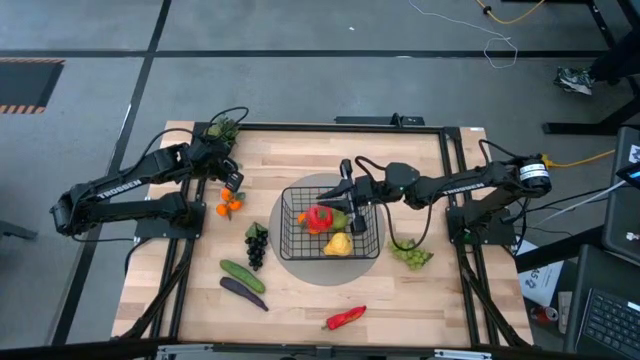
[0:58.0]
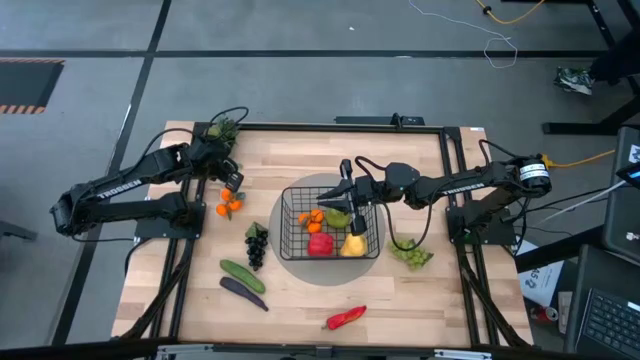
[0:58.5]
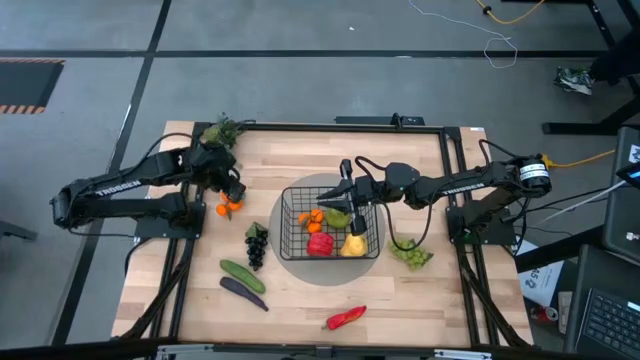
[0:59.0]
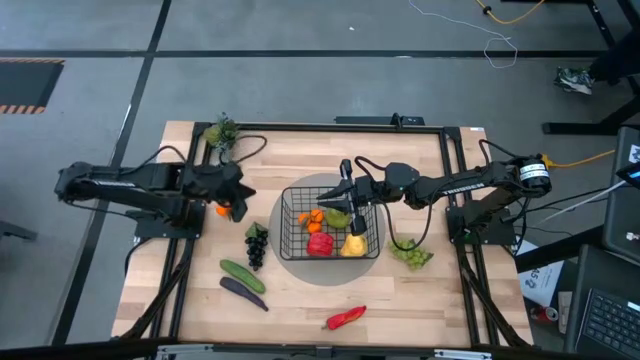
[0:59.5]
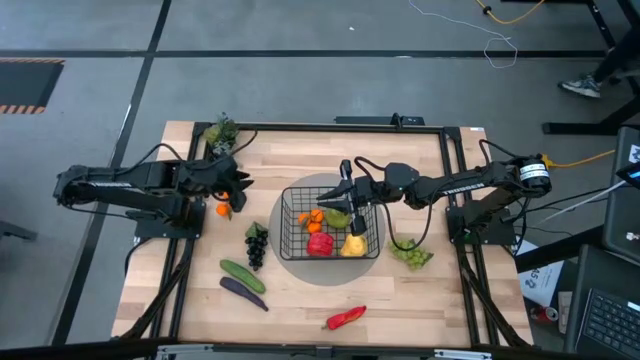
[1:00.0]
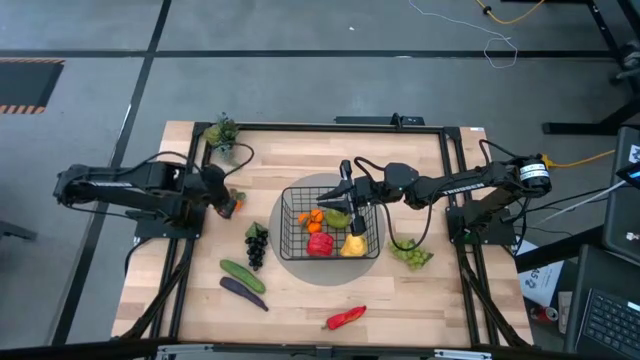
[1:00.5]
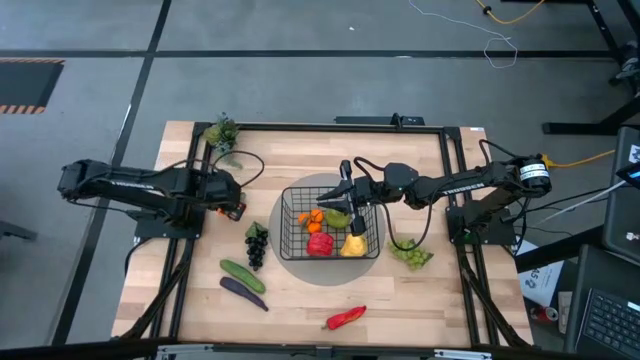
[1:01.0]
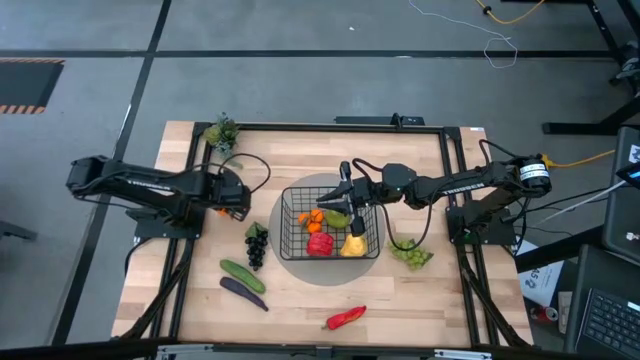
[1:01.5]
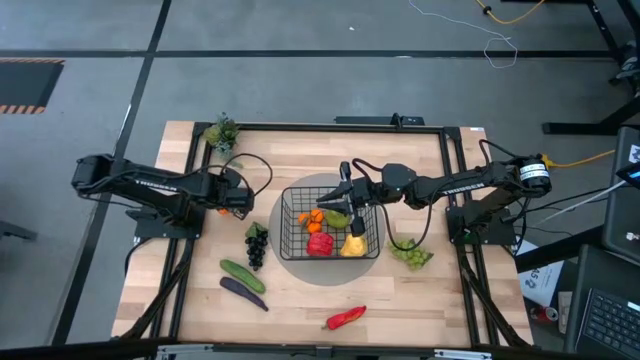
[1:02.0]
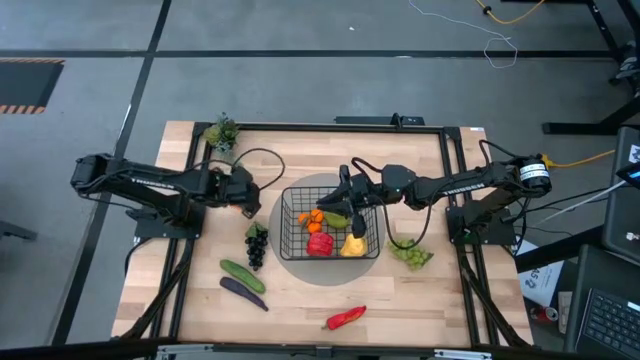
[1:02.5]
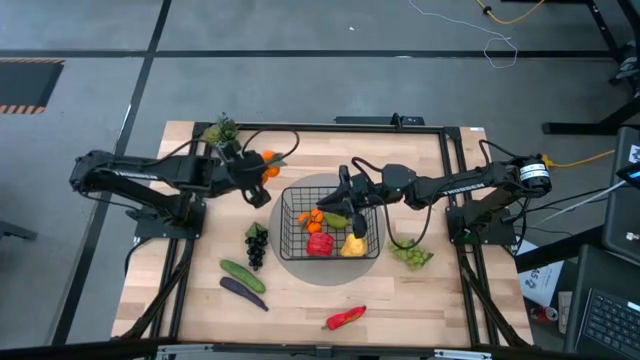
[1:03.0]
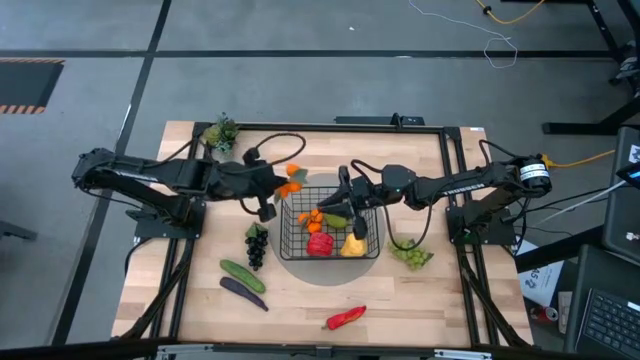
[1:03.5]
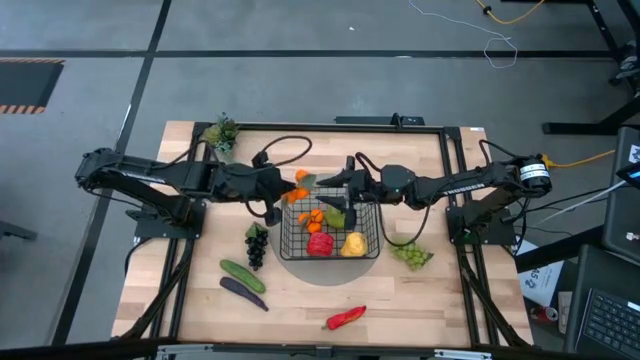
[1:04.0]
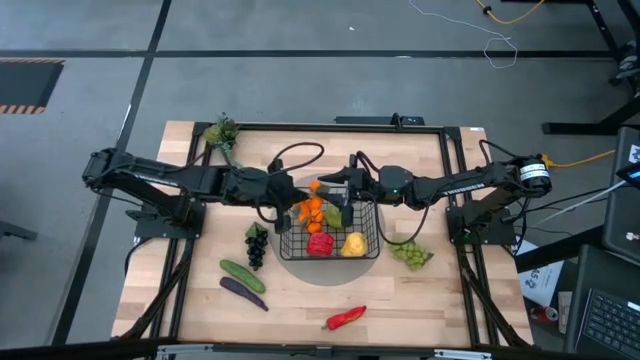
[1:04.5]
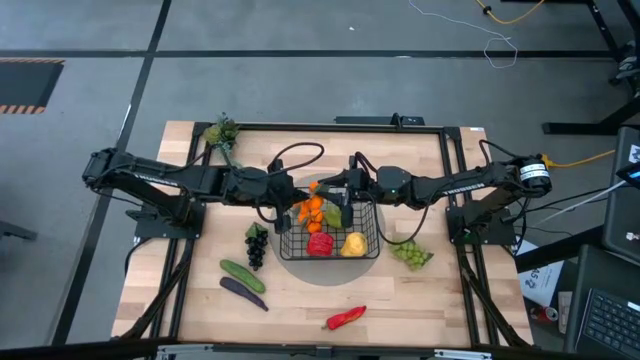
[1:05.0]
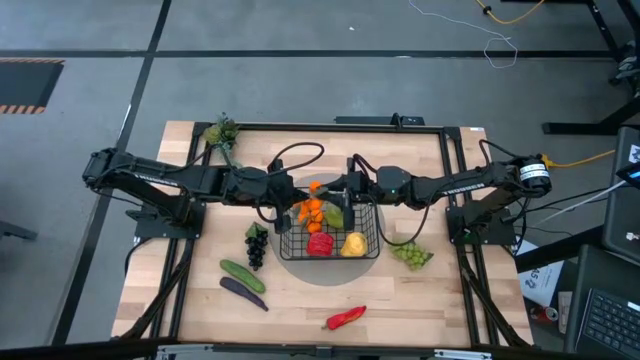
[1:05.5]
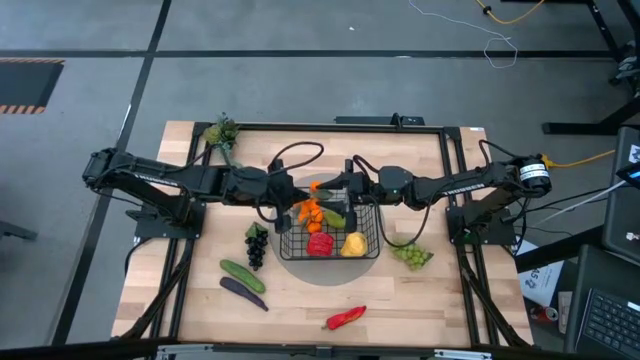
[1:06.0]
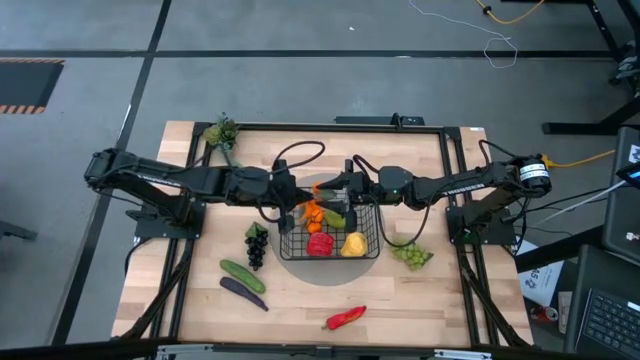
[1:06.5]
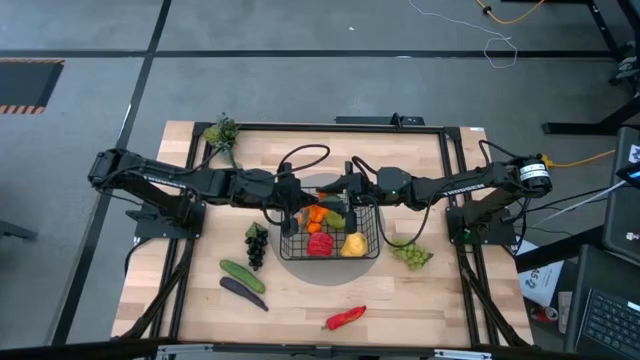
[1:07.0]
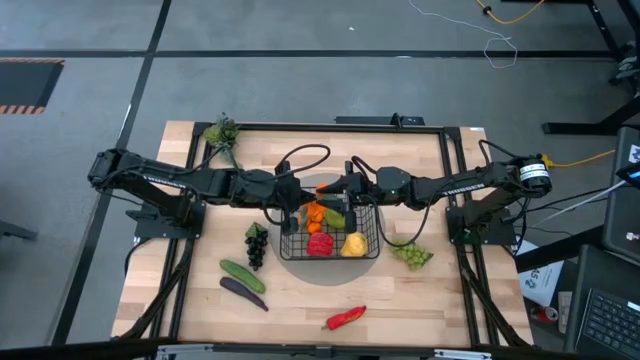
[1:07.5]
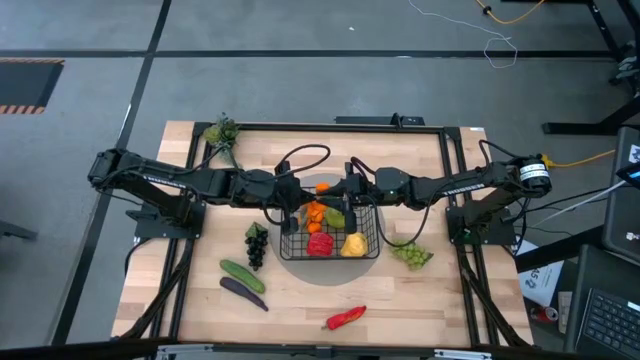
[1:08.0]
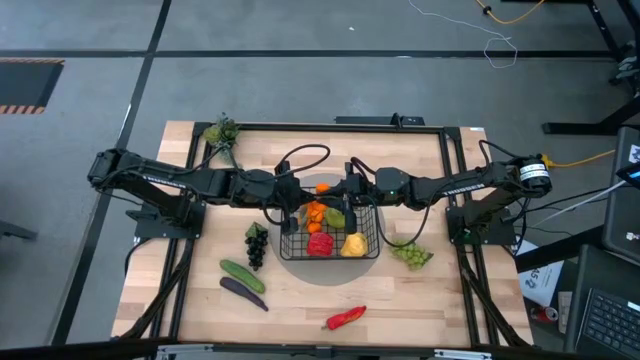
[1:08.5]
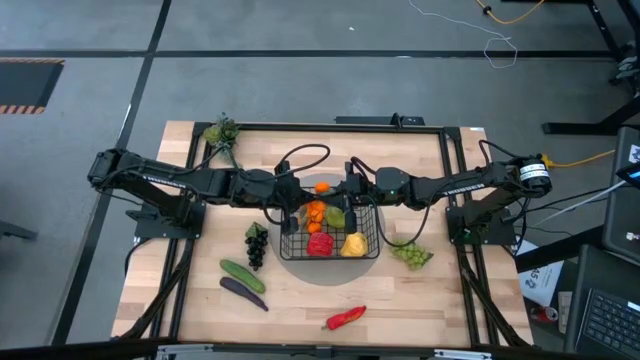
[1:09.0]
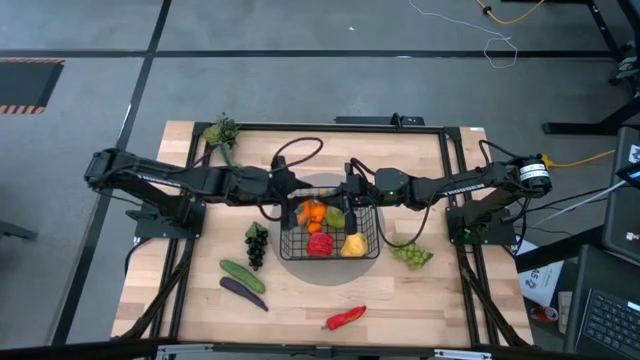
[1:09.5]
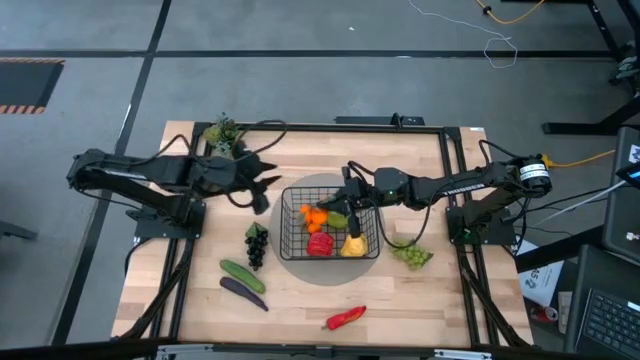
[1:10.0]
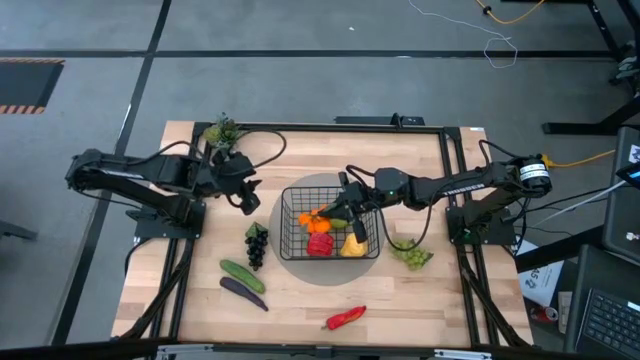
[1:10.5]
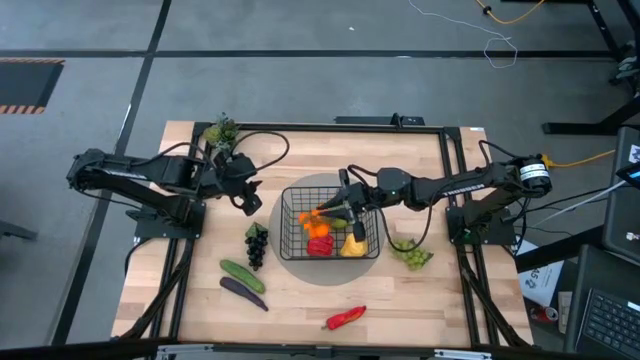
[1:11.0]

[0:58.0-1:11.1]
Task: Build produce basket
Put the tangerines into the black wire basket

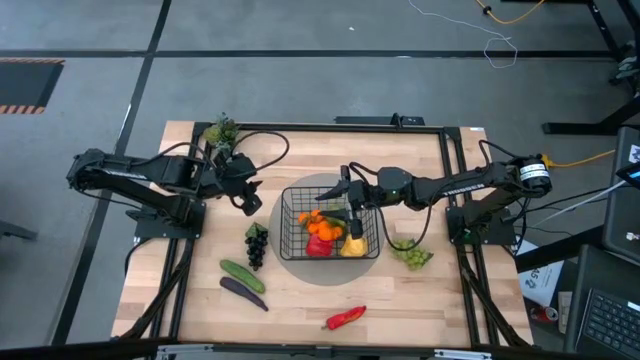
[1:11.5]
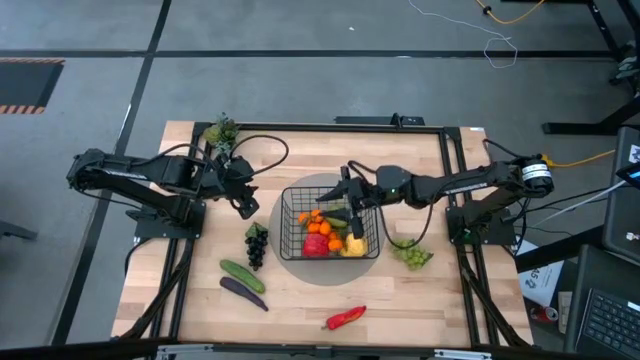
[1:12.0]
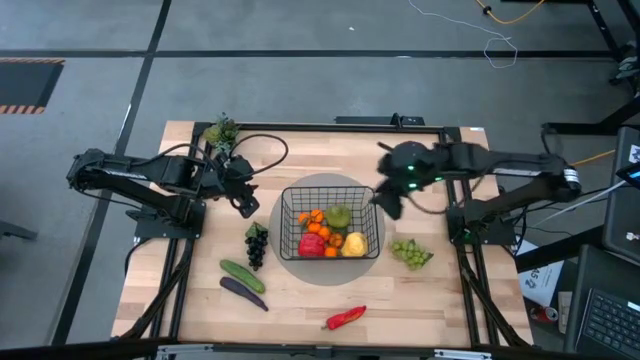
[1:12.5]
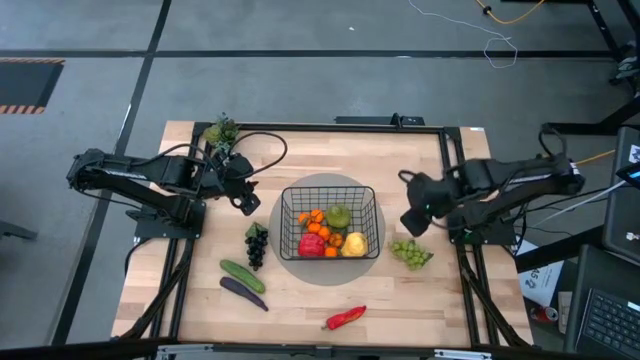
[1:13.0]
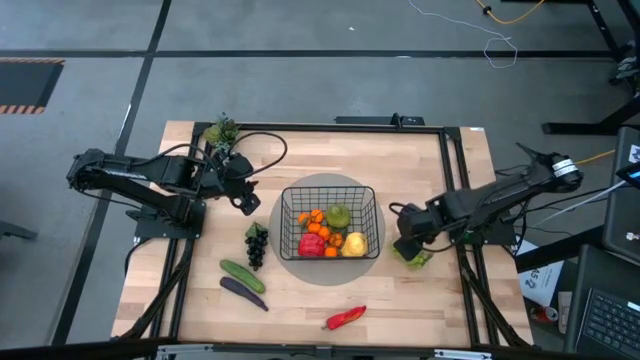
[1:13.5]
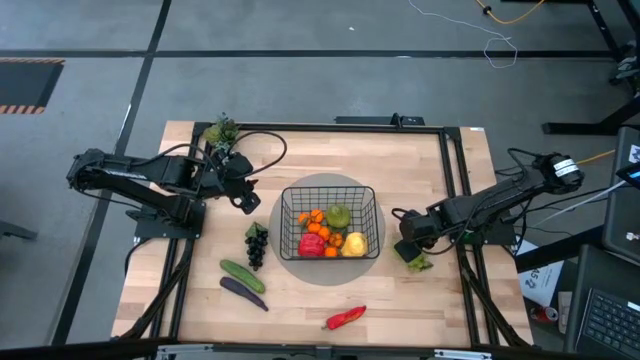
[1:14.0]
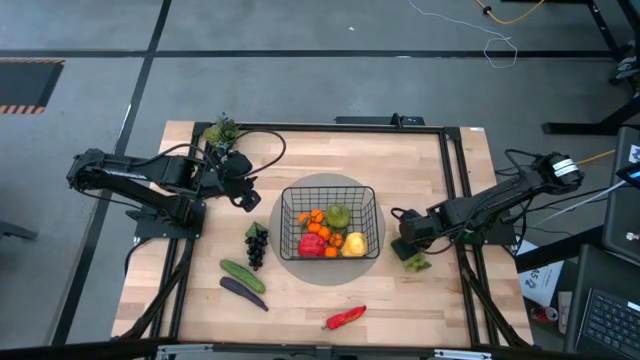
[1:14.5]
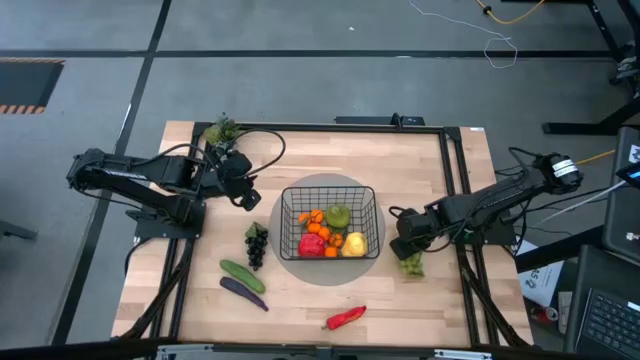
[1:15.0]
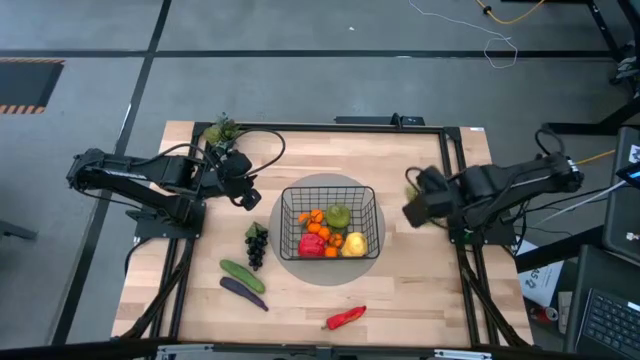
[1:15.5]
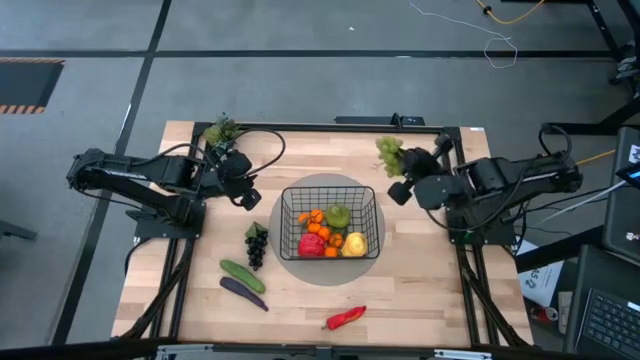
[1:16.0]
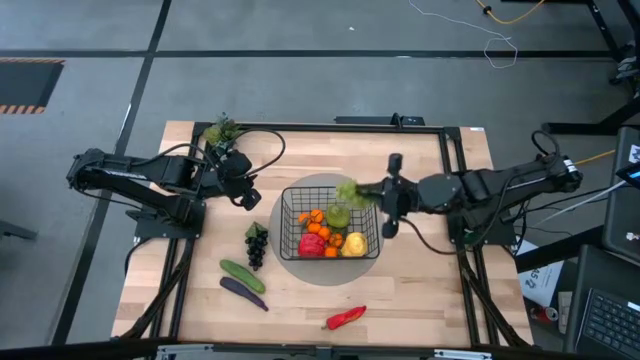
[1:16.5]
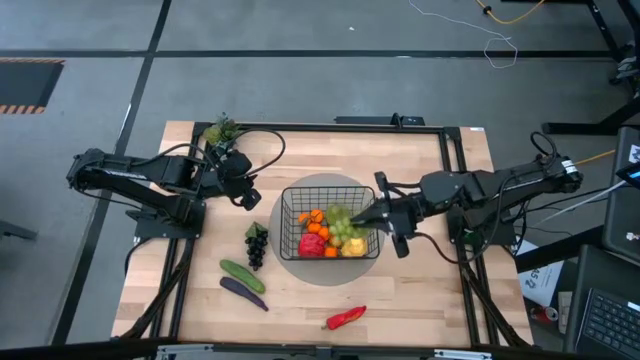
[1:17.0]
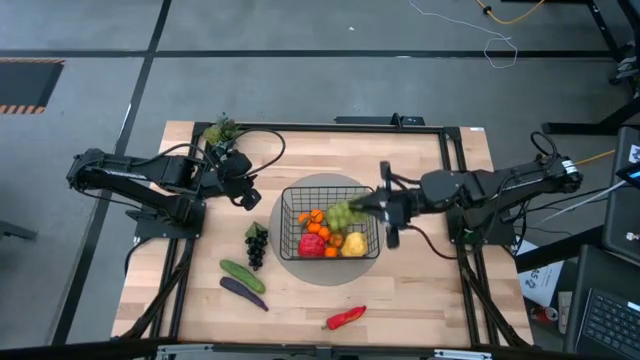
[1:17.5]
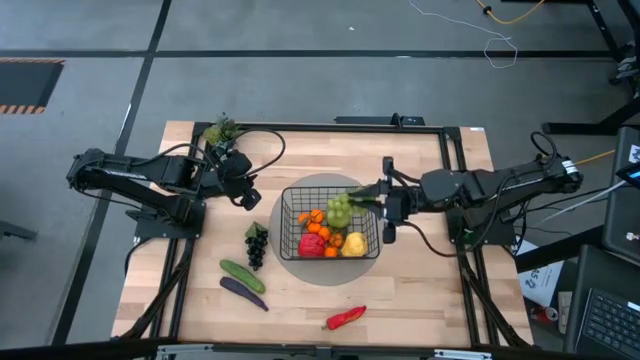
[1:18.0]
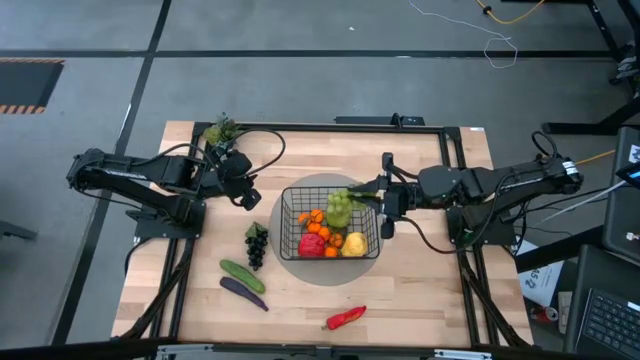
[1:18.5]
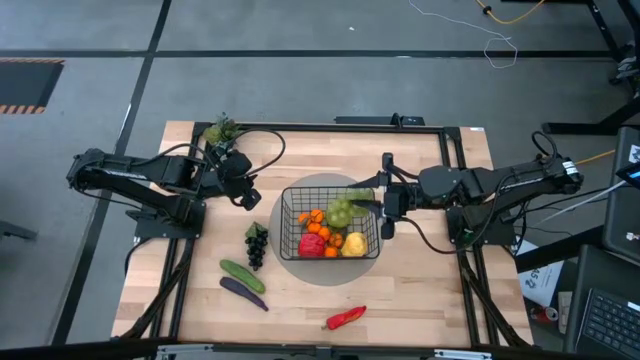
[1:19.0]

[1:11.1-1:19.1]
Put the green grapes into the black wire basket

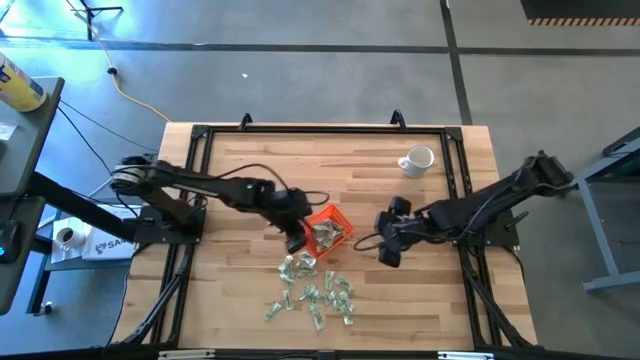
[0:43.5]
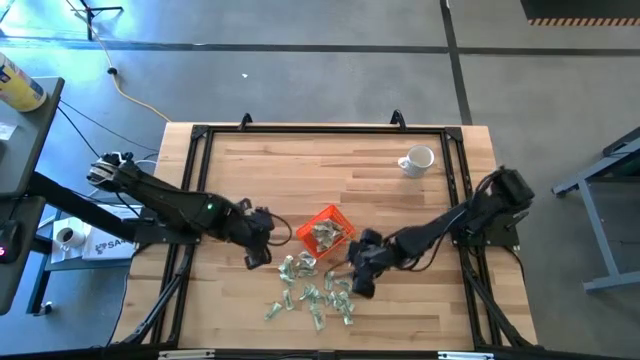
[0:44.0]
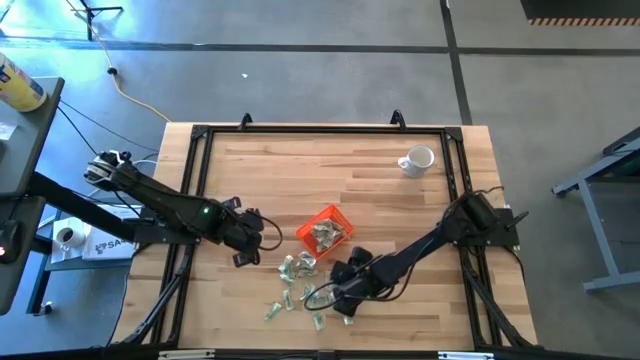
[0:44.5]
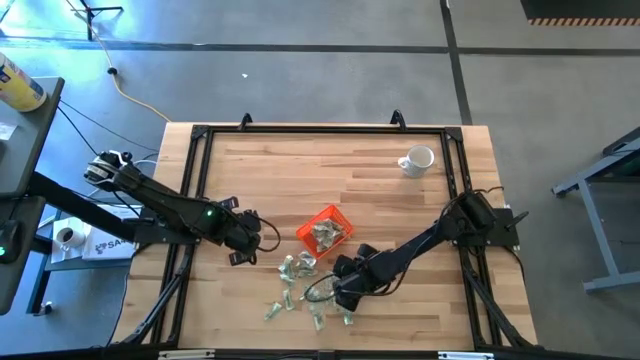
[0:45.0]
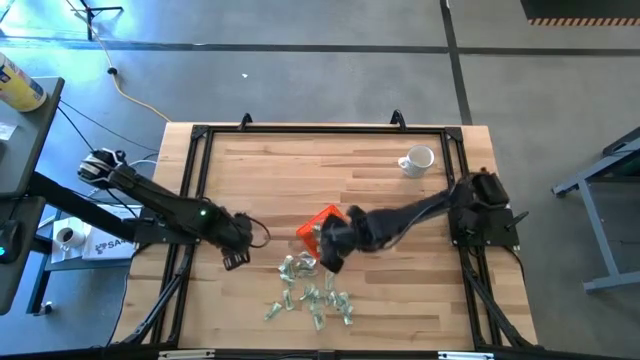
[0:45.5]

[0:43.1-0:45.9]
Task: Pick and place Stevia / Truvia into bins
Put the stevia packet into the orange bin
